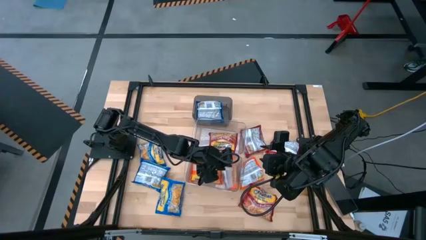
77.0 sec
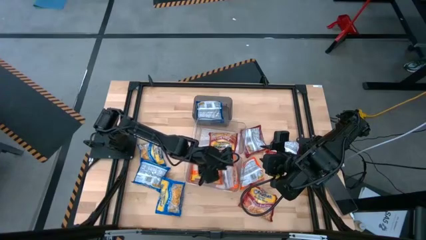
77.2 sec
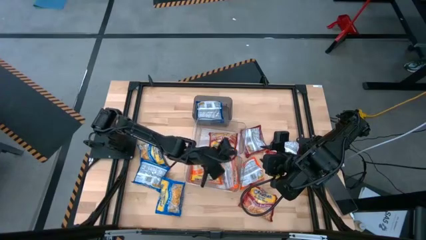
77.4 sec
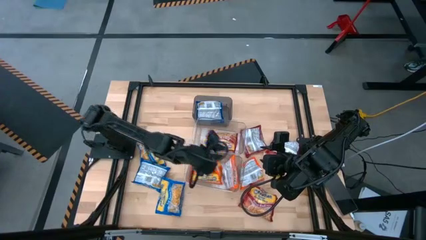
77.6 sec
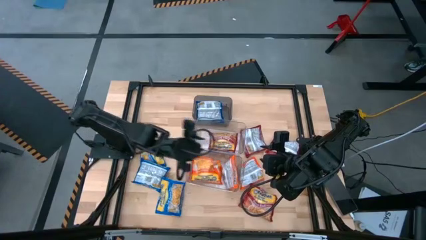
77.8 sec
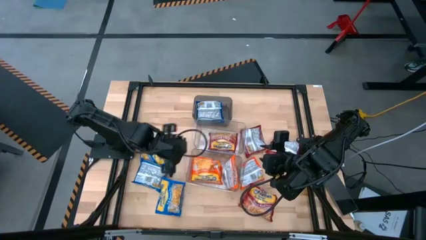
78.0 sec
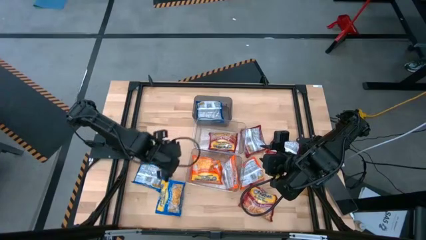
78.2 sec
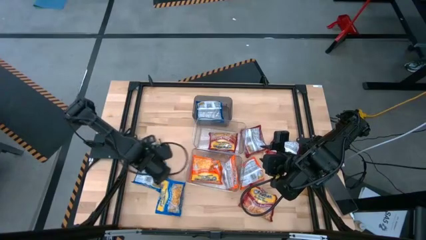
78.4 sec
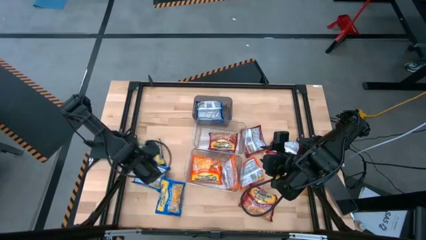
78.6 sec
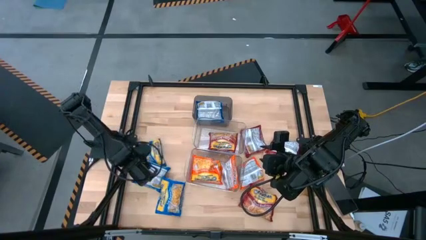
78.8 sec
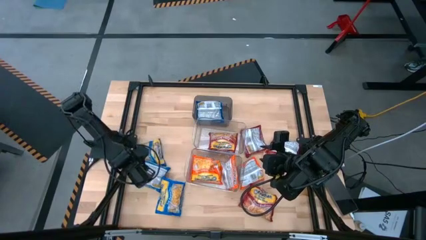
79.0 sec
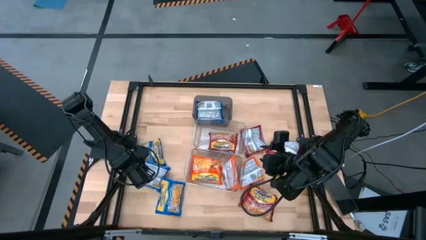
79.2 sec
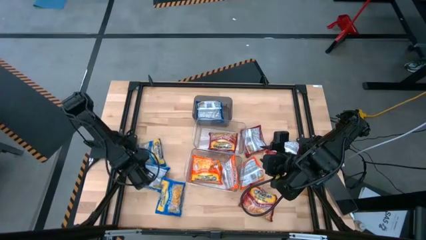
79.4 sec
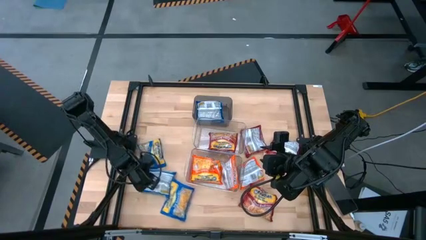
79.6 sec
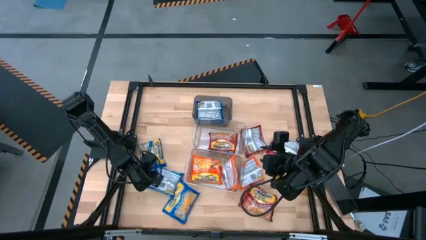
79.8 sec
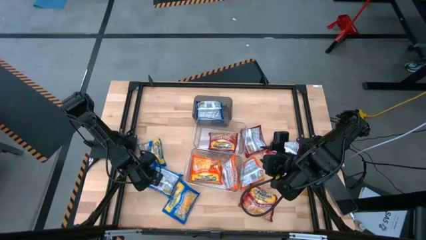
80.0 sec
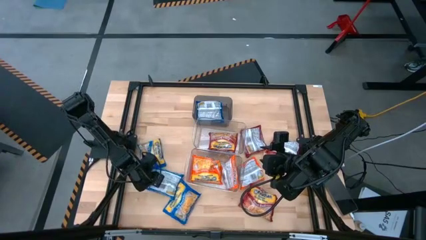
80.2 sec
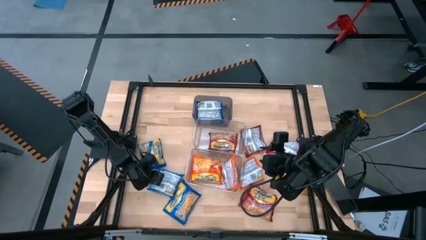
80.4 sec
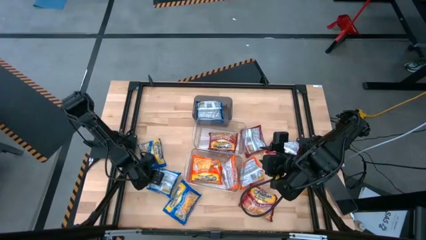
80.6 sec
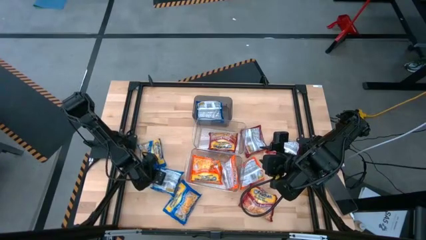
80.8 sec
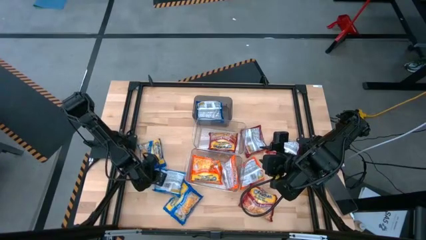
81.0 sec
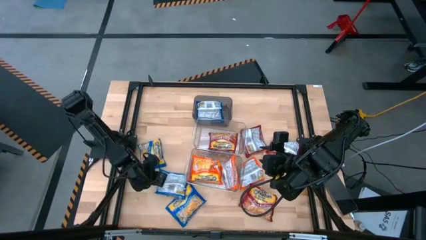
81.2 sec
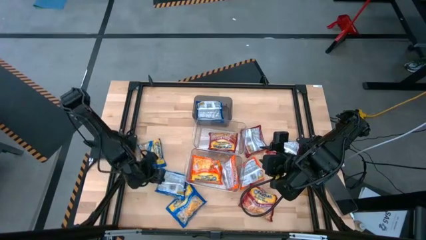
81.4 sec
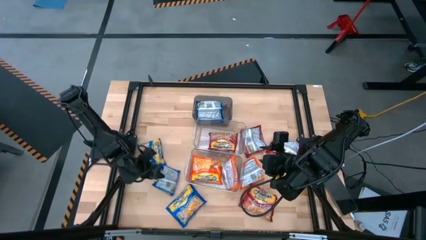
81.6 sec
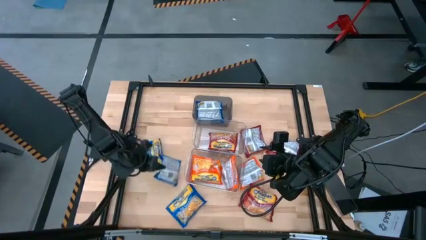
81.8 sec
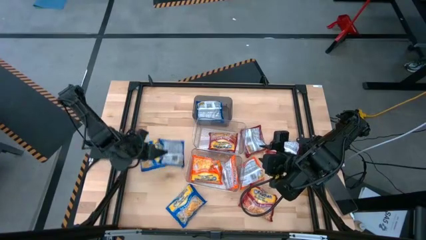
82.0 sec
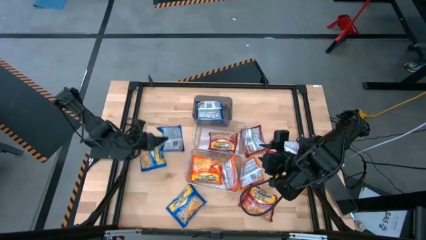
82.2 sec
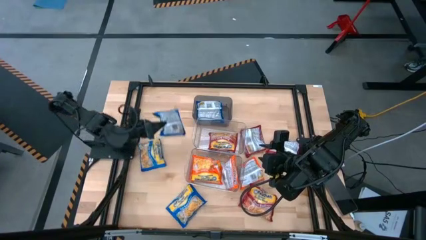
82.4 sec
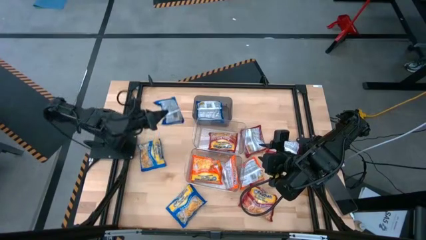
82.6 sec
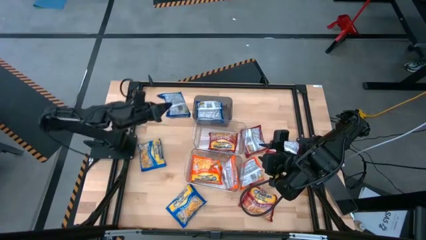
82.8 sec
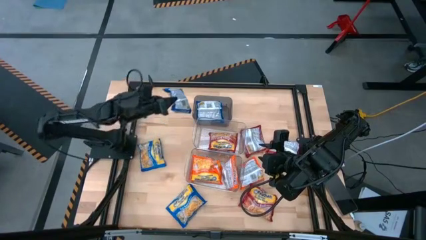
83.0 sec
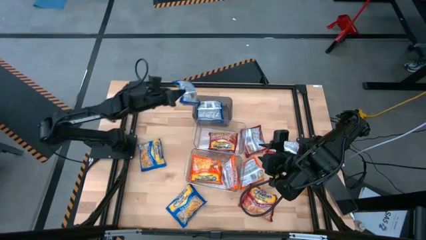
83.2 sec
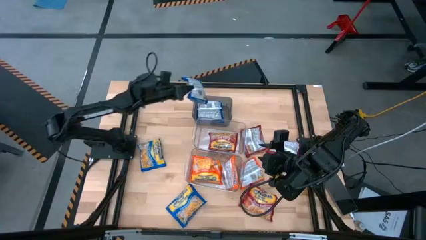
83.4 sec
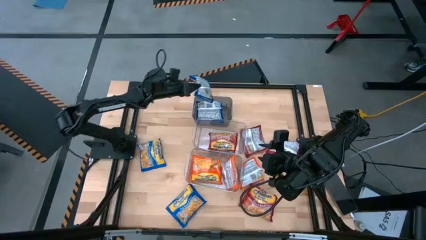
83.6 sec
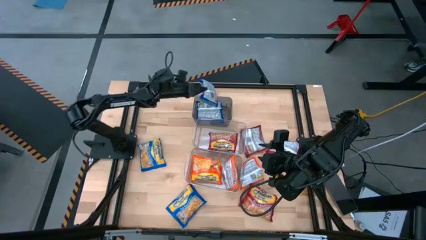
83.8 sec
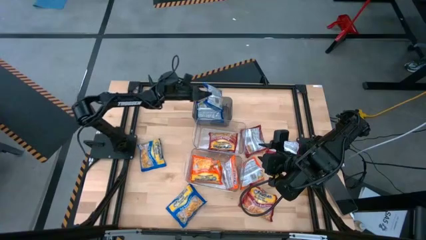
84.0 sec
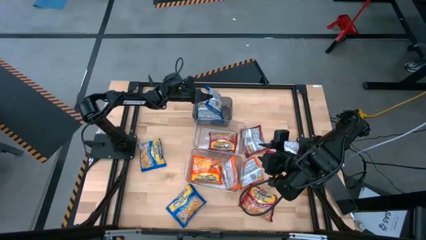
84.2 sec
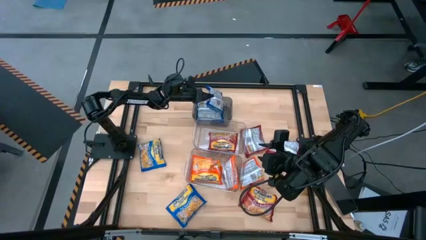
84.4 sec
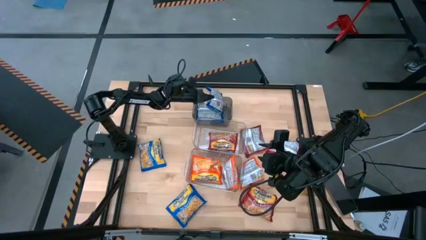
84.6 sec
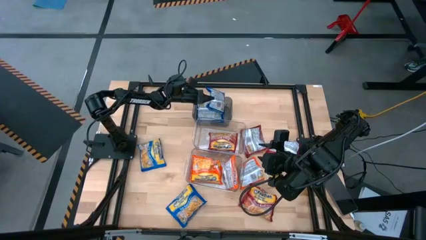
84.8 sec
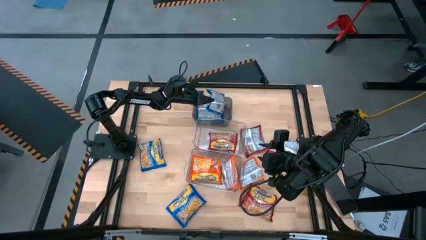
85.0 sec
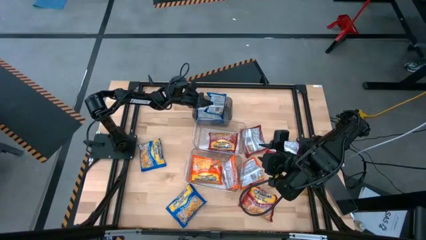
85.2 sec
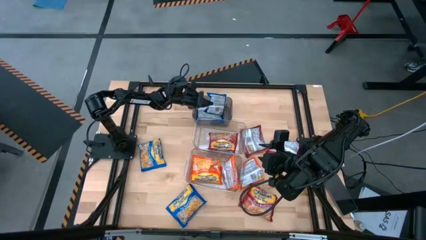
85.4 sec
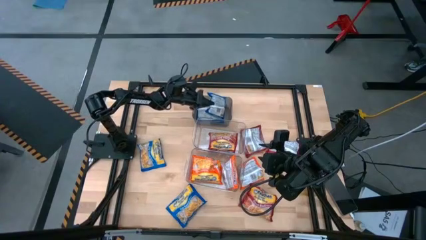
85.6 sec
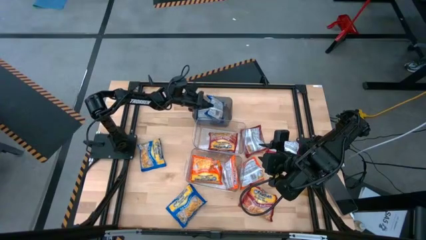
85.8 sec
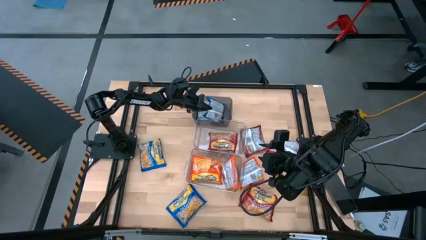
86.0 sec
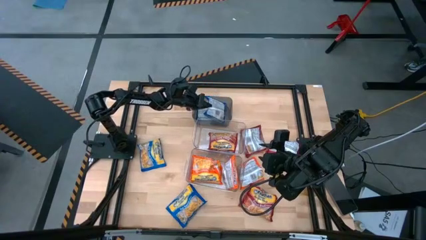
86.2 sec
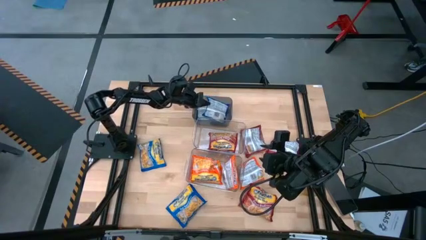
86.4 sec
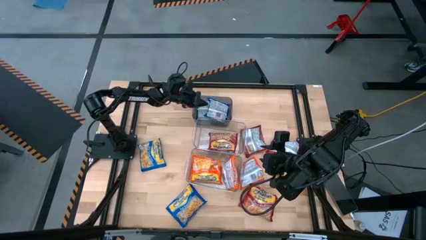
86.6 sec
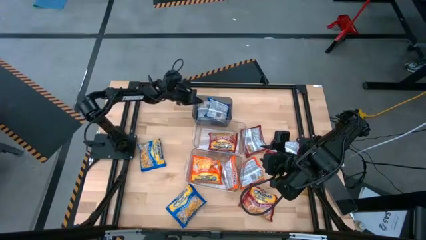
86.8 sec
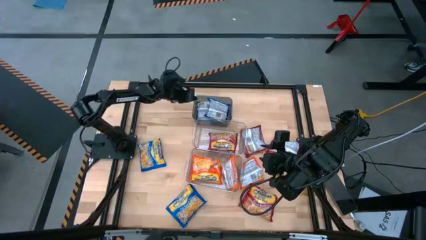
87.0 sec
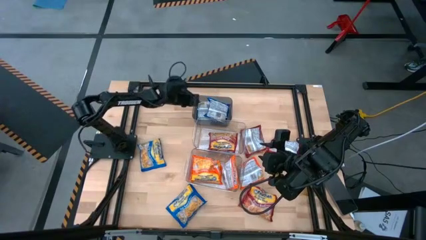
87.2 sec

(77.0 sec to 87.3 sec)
Task: Sort Maruchan noodles
Put the middle left blue noddle pack into the black bin
